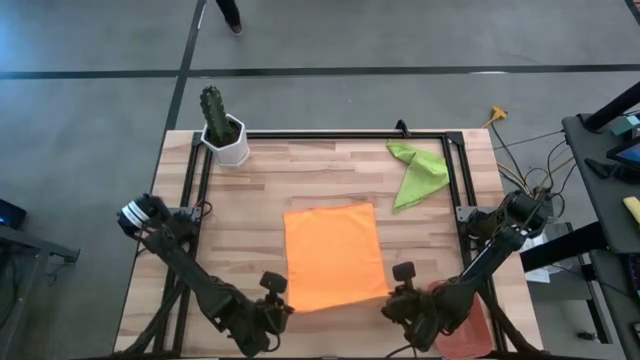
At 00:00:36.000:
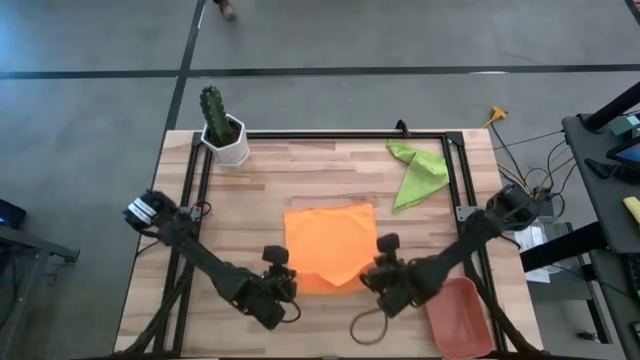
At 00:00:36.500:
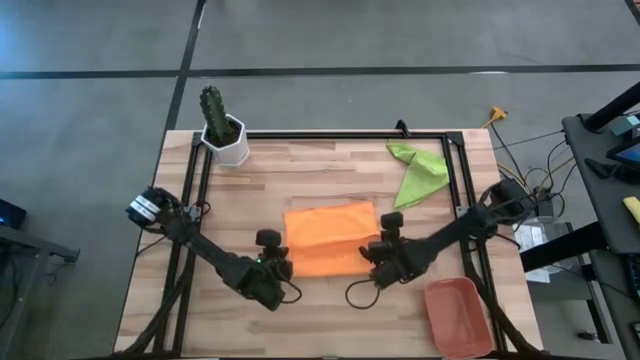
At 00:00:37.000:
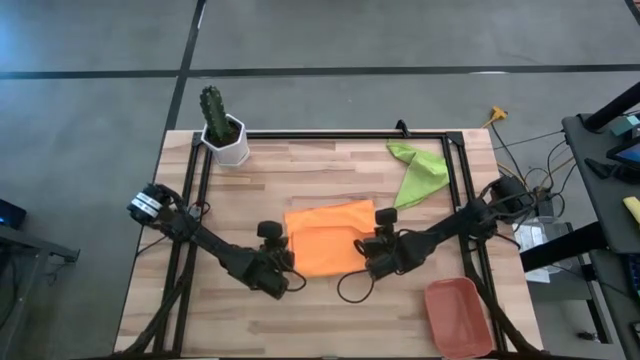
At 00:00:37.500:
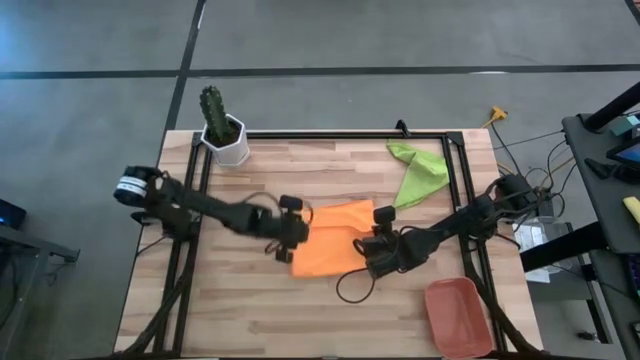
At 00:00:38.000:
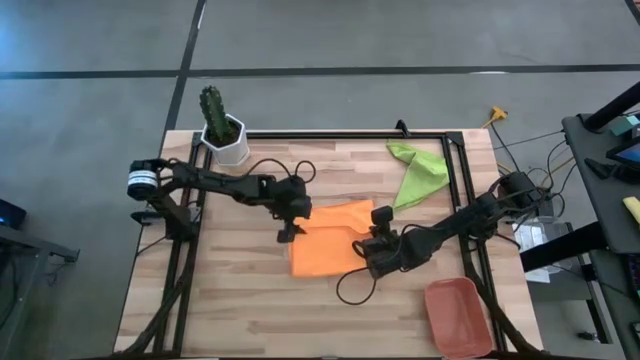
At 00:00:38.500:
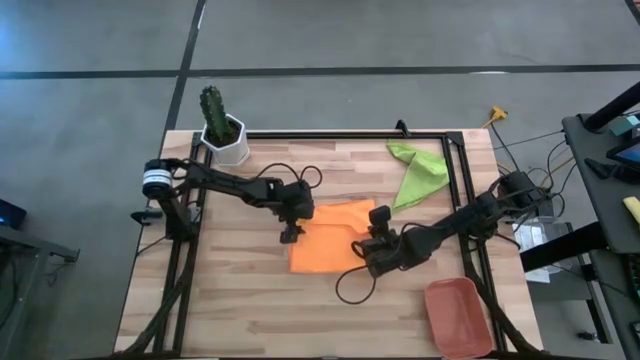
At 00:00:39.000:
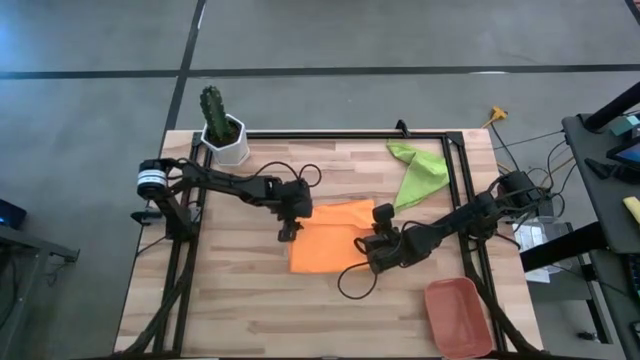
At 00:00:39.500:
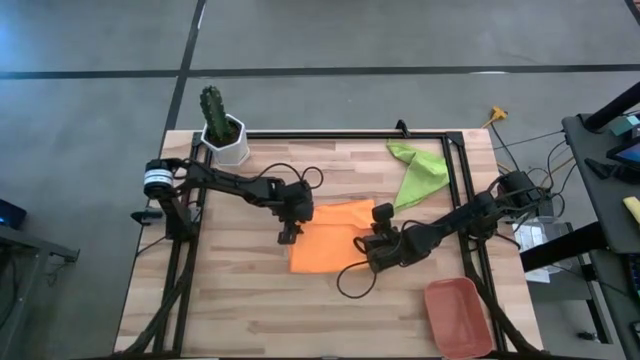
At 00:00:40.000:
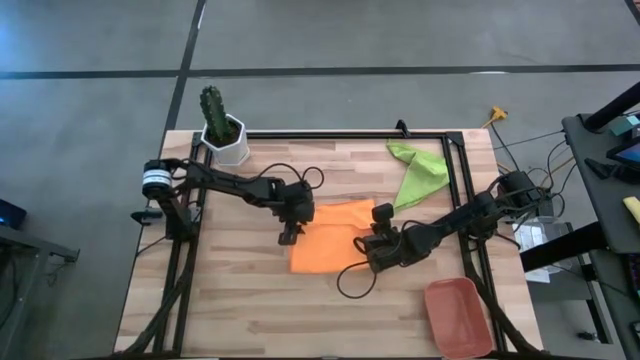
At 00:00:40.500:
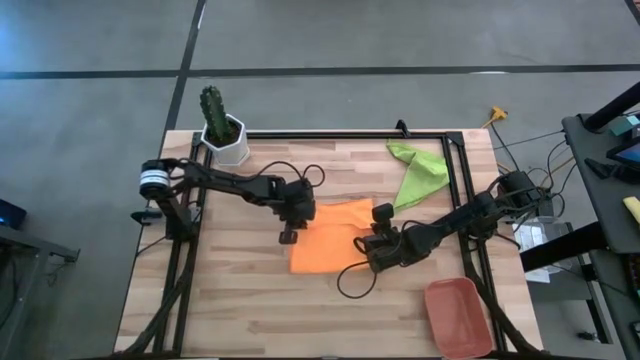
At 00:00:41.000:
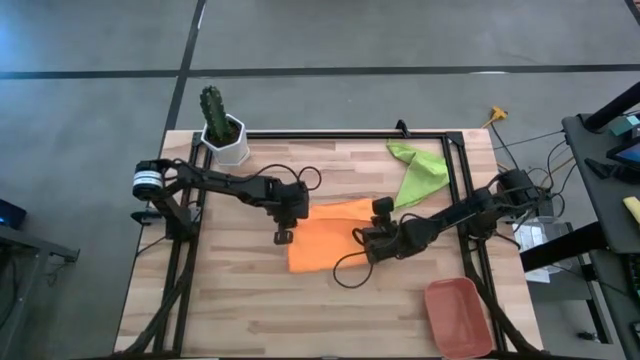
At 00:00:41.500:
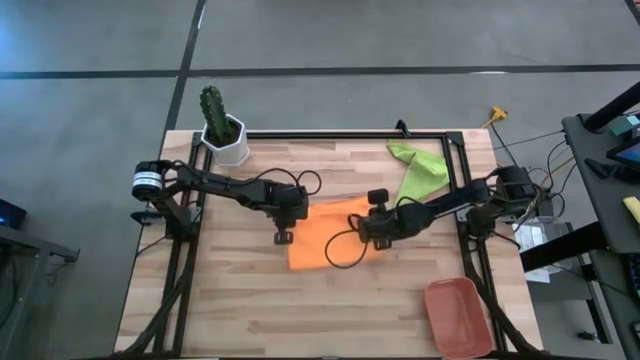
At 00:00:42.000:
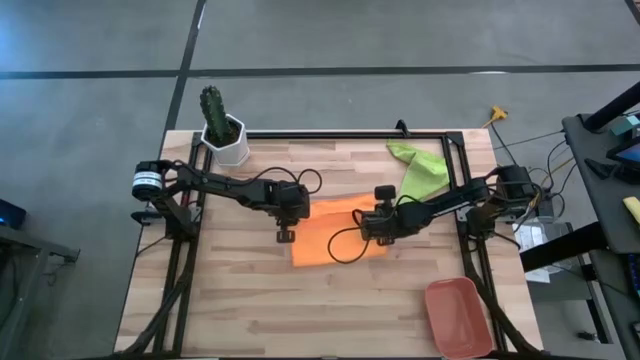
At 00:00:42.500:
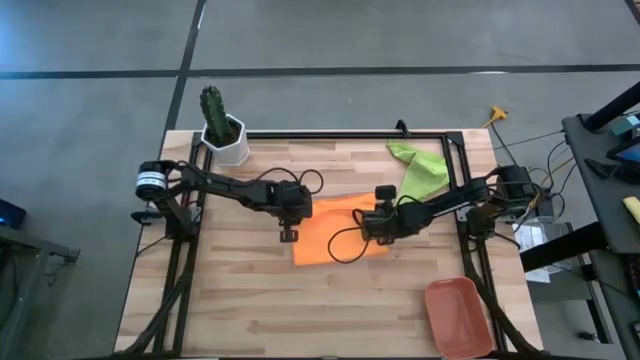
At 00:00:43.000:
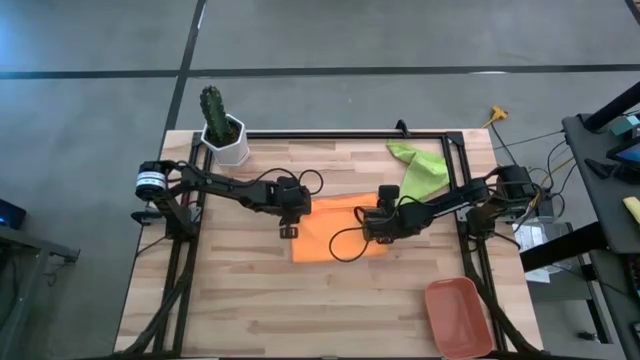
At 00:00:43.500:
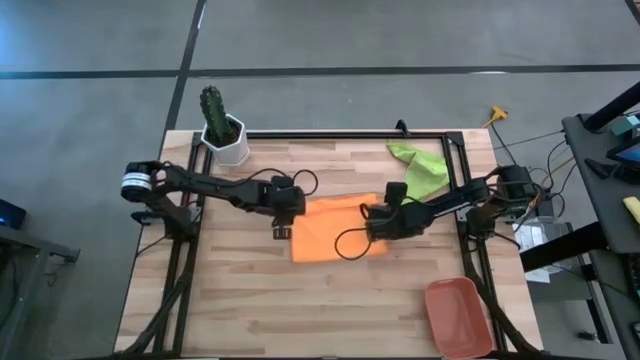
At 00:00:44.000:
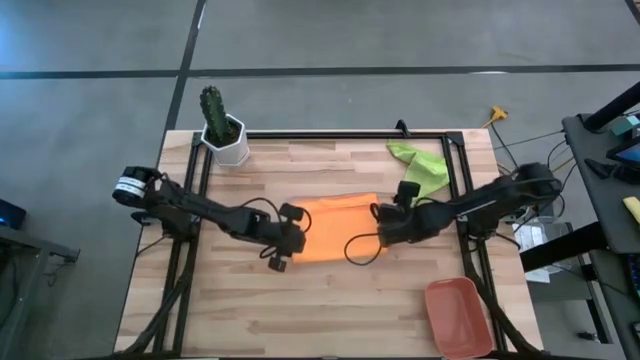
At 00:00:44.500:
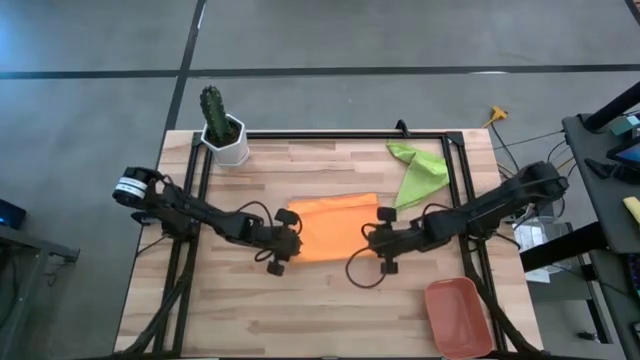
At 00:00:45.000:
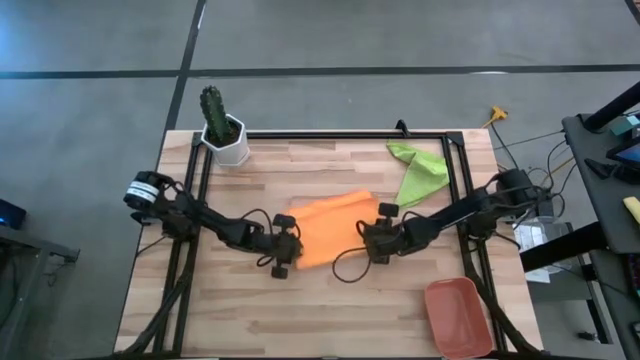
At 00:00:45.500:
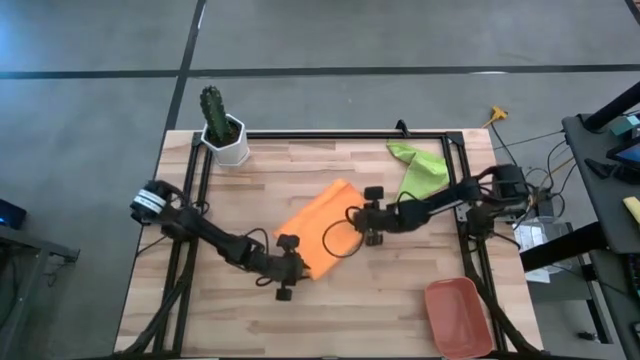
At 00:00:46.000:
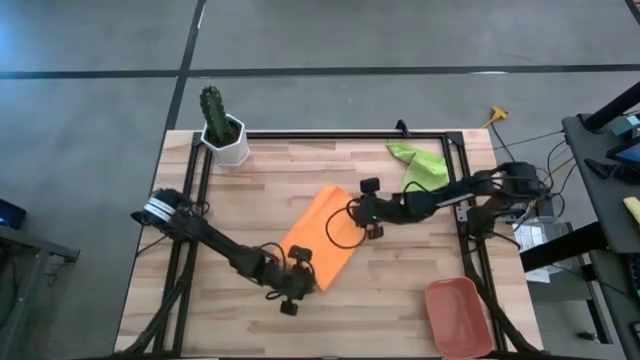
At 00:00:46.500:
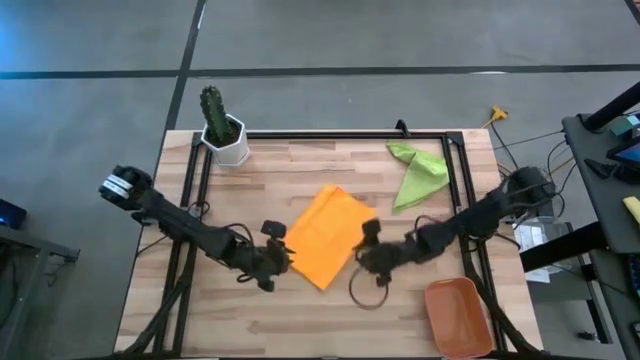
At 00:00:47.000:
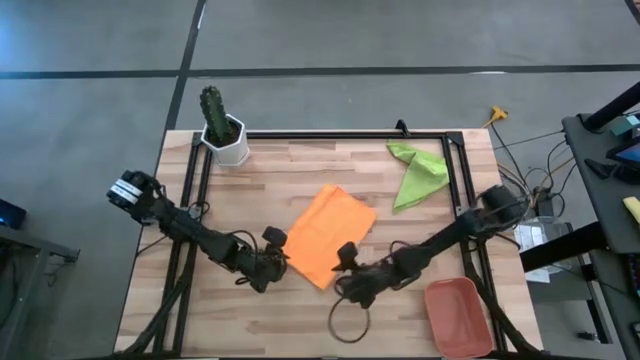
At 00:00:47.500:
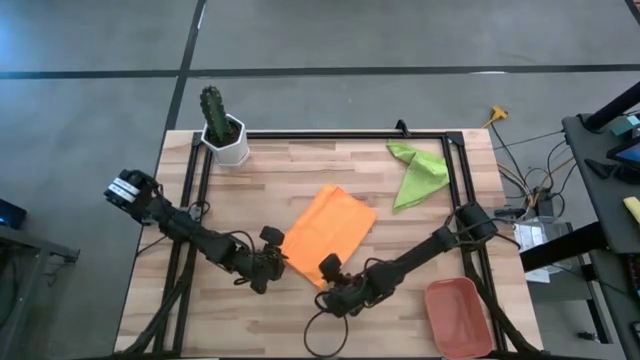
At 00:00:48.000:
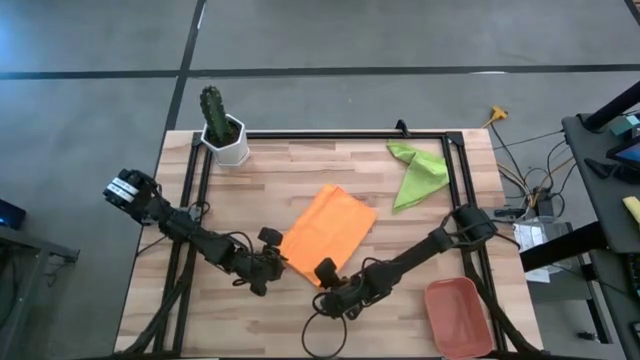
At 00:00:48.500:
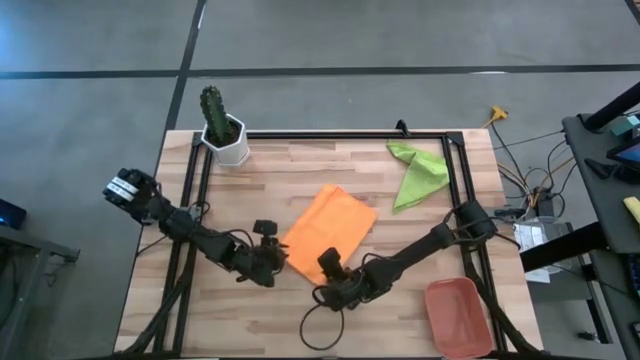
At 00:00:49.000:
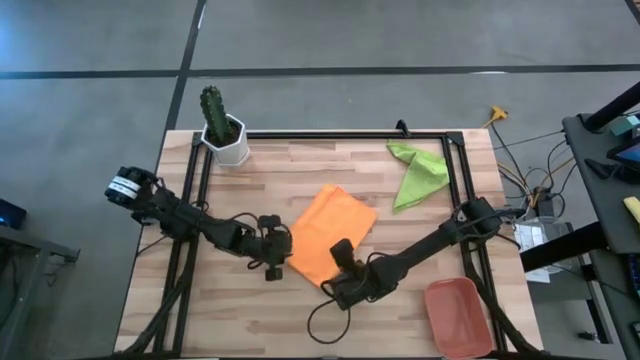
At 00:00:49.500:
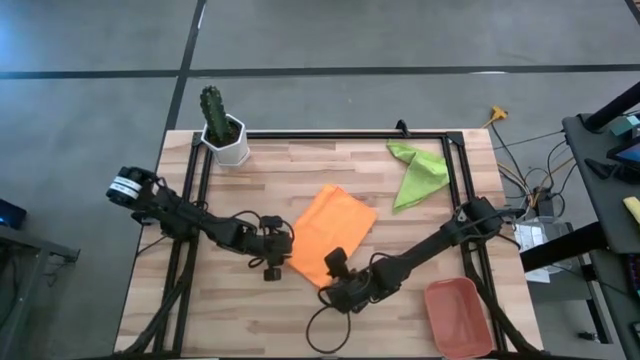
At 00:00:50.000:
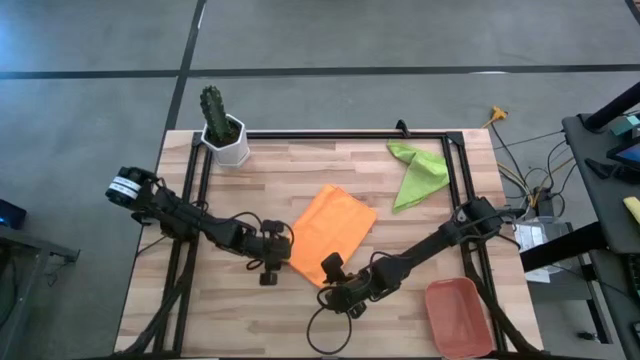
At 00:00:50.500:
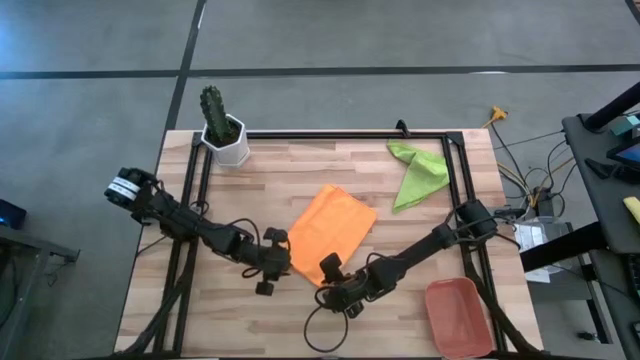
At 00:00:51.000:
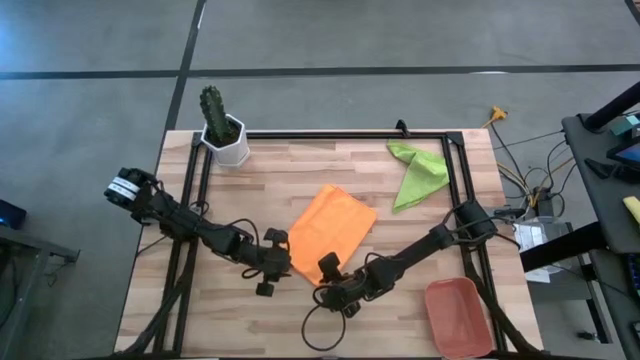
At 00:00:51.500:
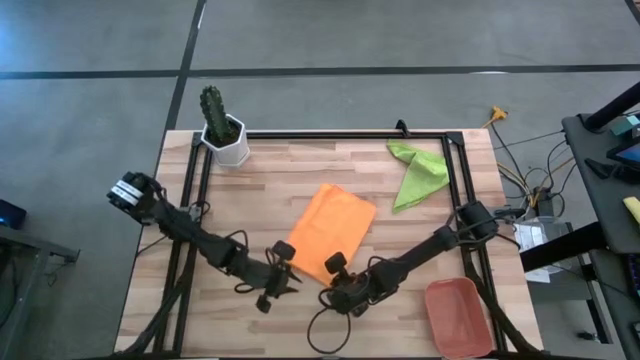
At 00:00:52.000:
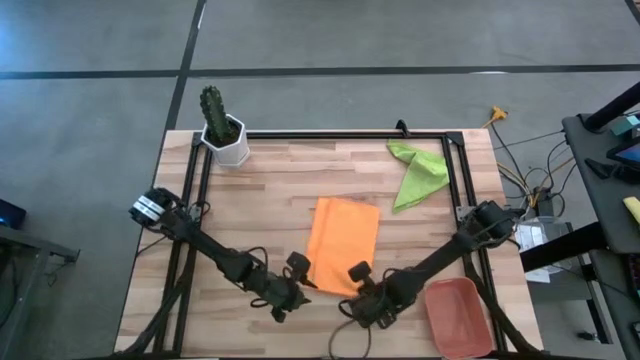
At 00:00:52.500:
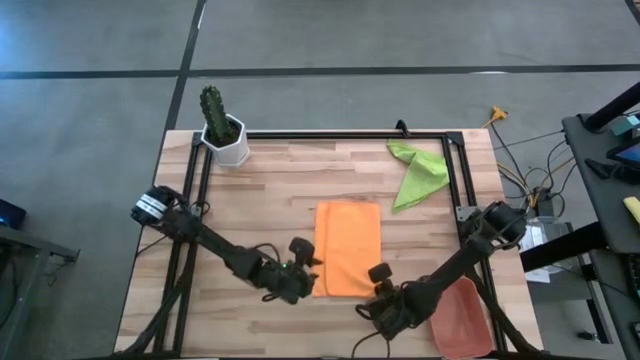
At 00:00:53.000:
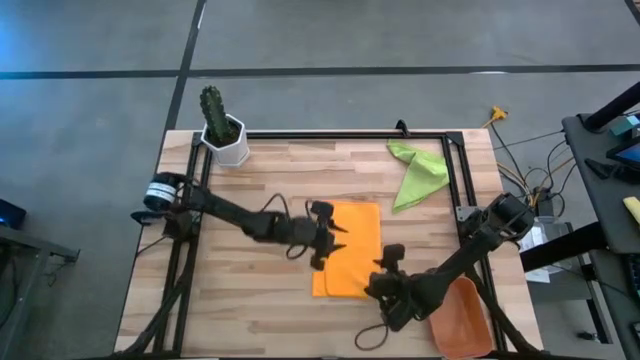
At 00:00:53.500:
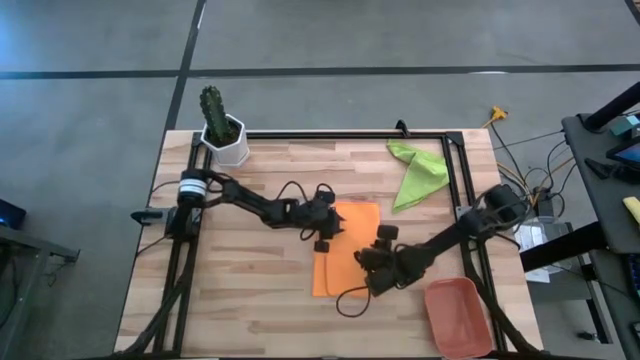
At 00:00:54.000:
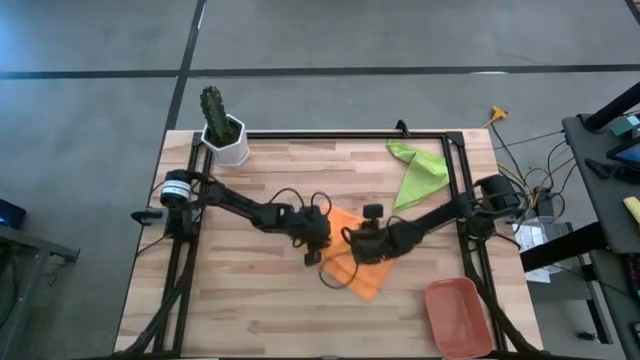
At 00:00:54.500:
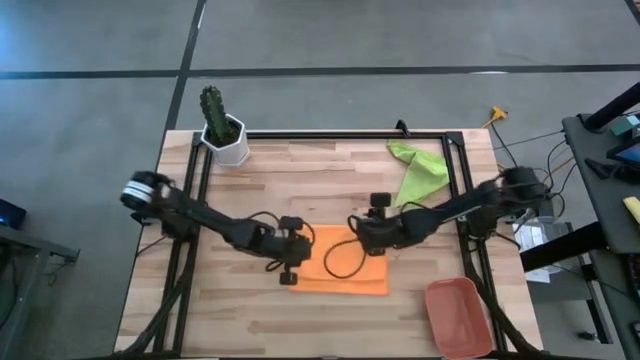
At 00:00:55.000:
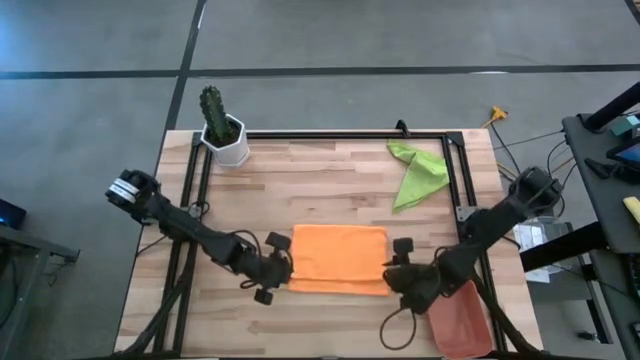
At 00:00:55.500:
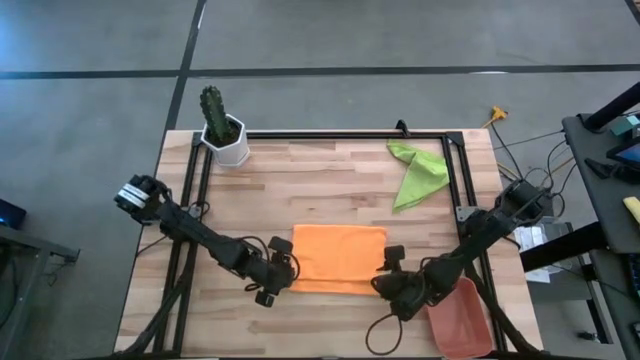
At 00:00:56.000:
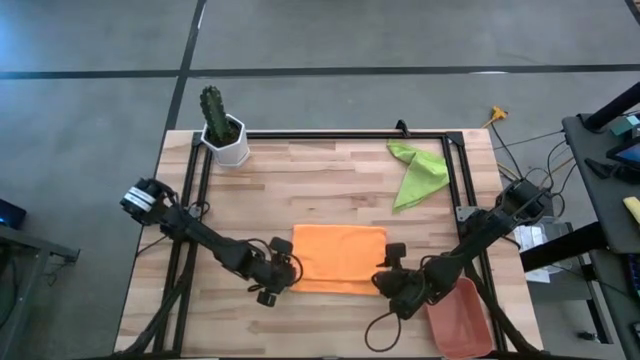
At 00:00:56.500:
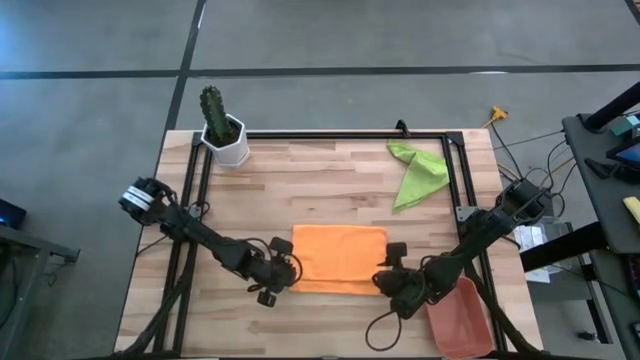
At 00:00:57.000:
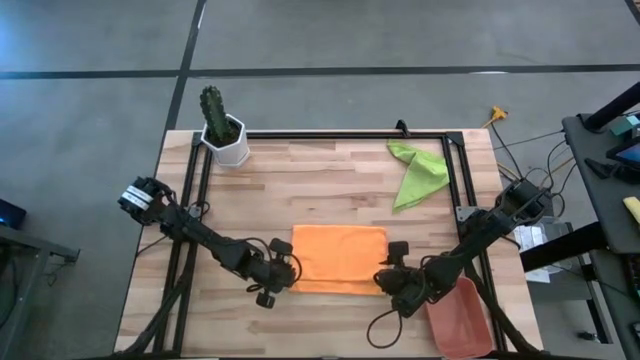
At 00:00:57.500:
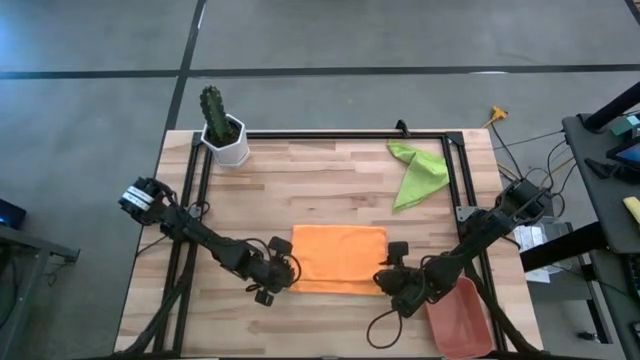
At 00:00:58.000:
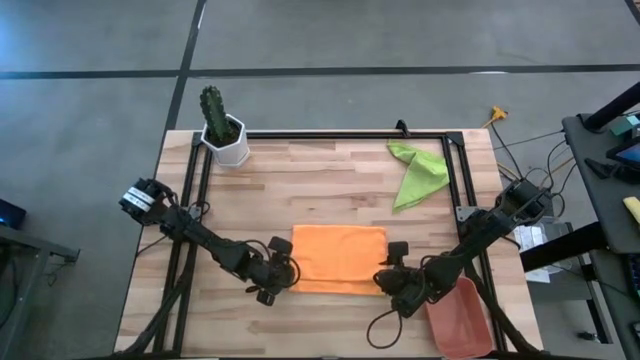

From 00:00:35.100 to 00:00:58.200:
Task: Roll microfiber towels into tight, uniform cylinder then place into a basket
Fold the orange microfiber cloth
